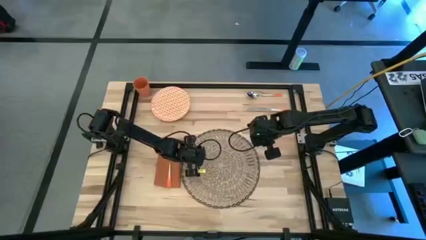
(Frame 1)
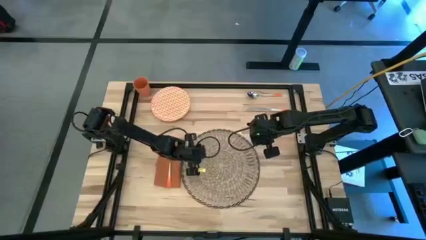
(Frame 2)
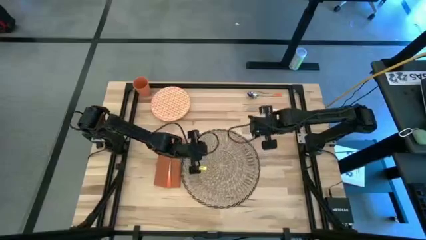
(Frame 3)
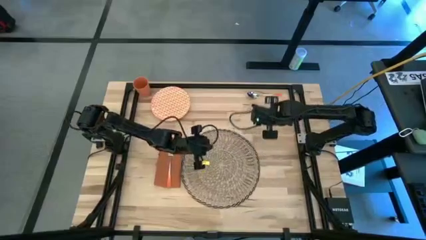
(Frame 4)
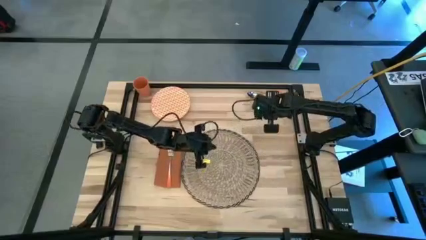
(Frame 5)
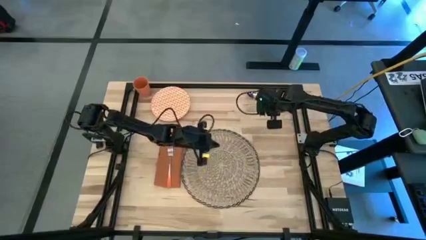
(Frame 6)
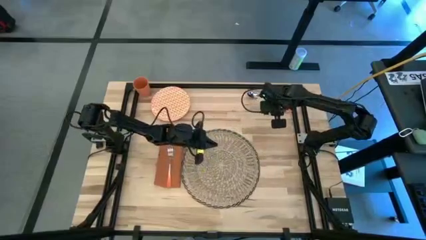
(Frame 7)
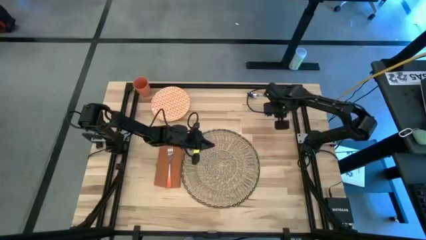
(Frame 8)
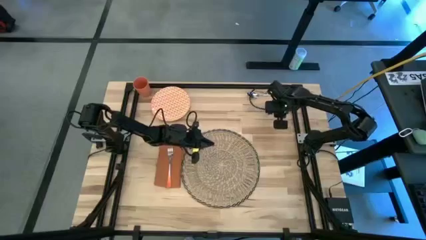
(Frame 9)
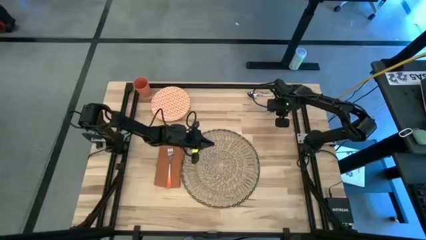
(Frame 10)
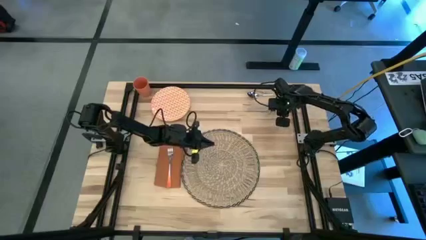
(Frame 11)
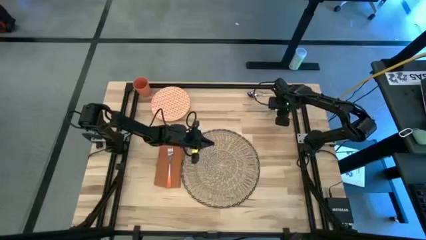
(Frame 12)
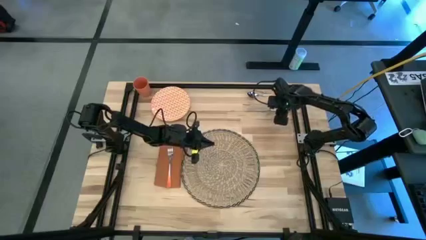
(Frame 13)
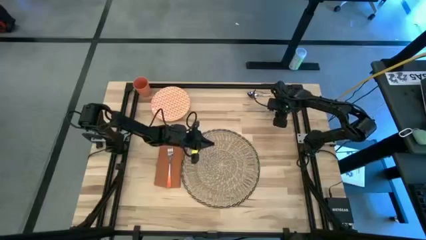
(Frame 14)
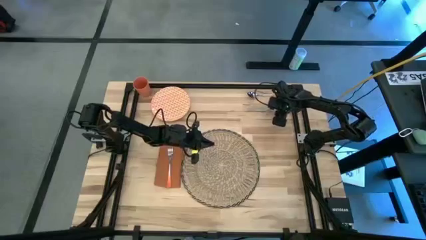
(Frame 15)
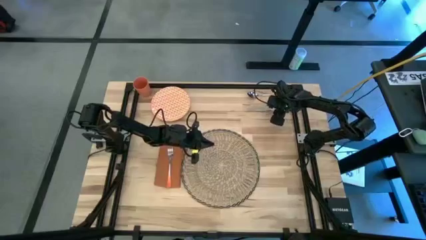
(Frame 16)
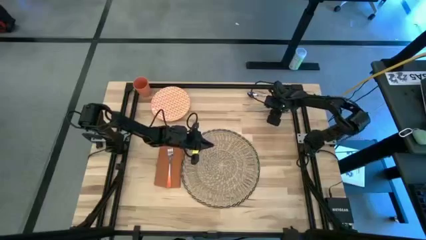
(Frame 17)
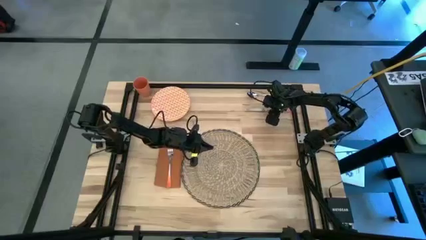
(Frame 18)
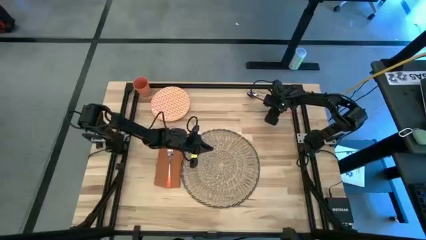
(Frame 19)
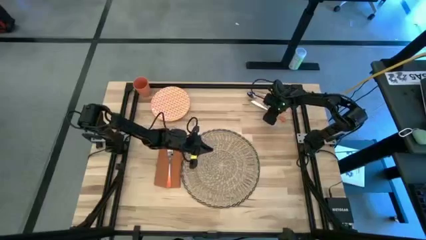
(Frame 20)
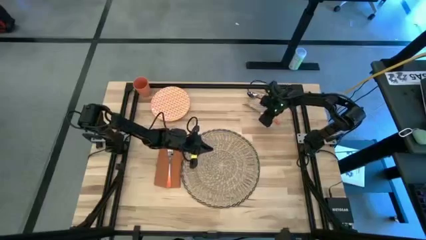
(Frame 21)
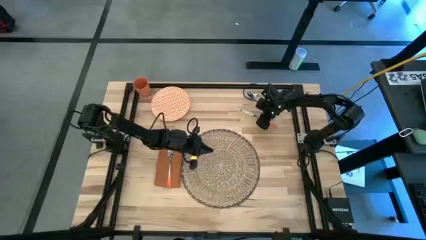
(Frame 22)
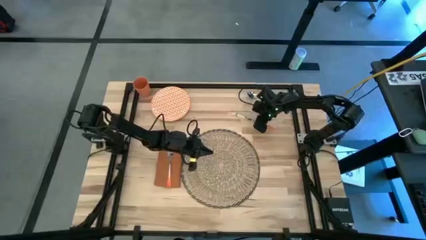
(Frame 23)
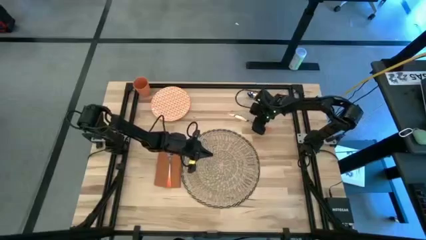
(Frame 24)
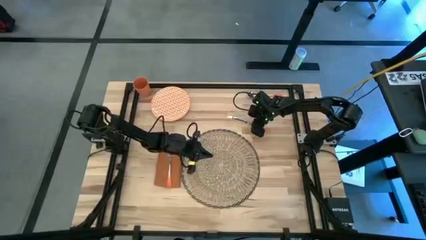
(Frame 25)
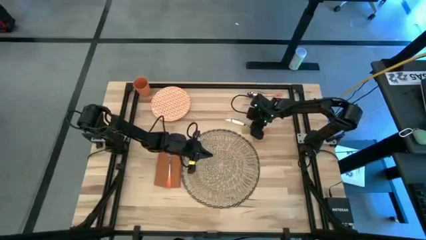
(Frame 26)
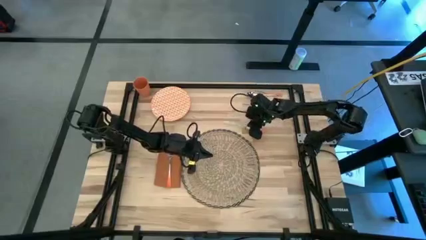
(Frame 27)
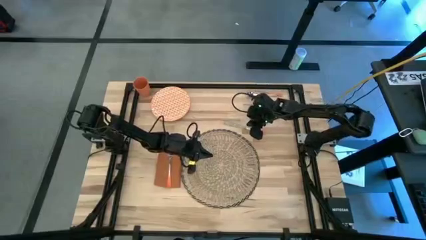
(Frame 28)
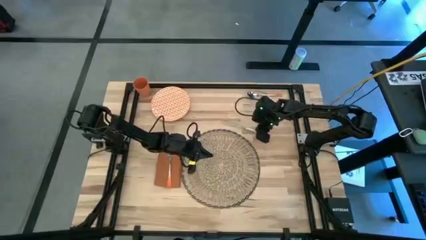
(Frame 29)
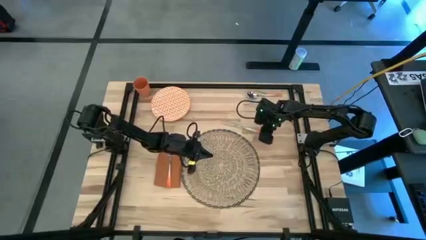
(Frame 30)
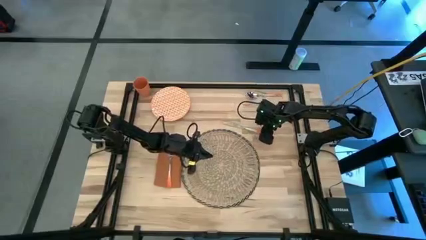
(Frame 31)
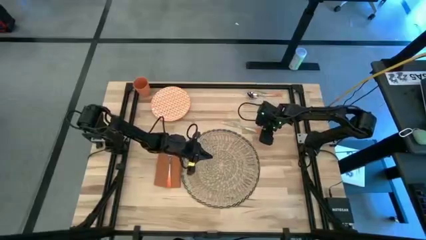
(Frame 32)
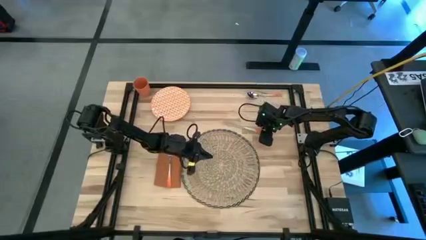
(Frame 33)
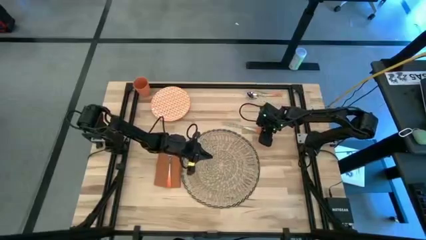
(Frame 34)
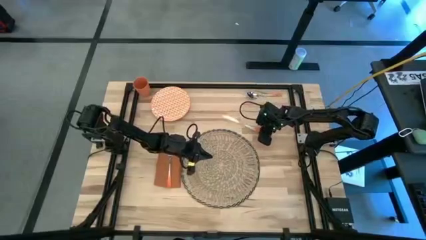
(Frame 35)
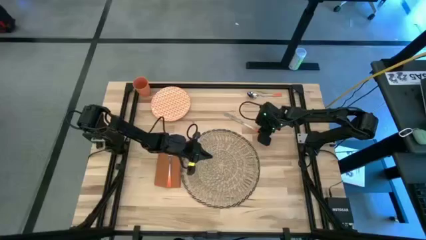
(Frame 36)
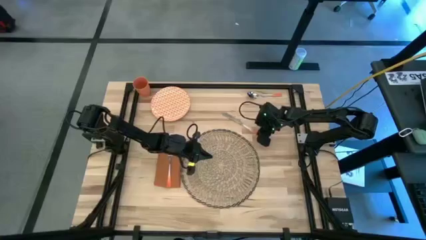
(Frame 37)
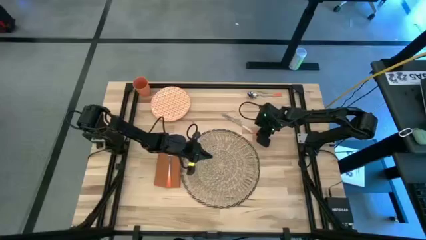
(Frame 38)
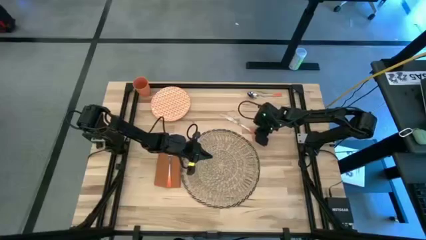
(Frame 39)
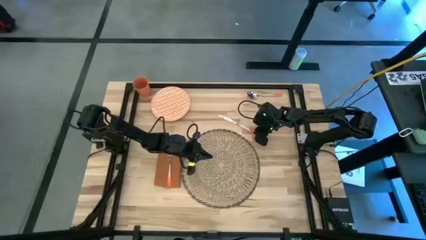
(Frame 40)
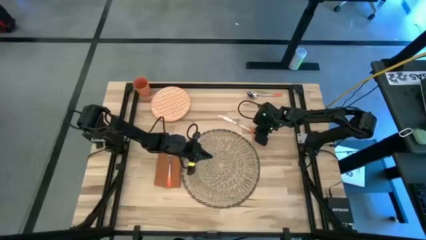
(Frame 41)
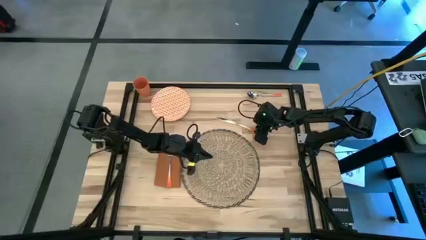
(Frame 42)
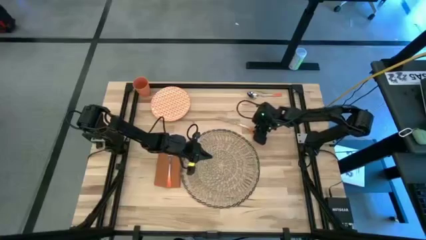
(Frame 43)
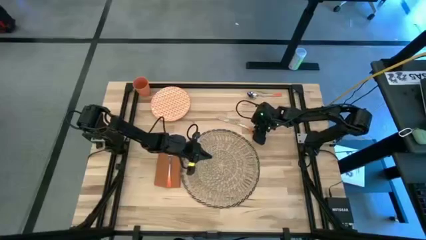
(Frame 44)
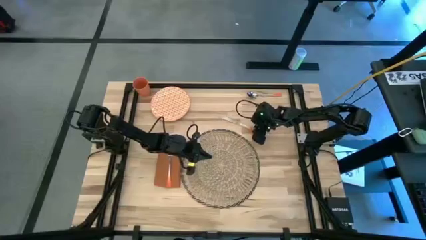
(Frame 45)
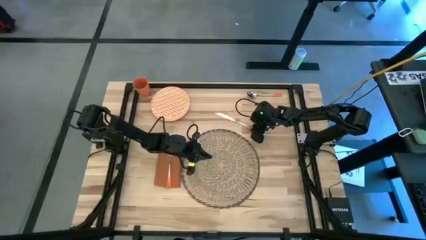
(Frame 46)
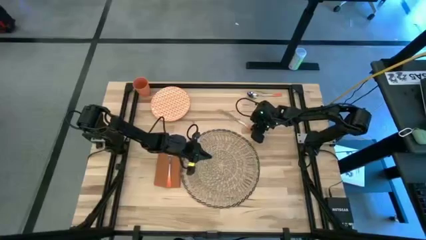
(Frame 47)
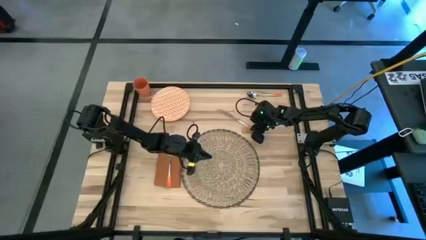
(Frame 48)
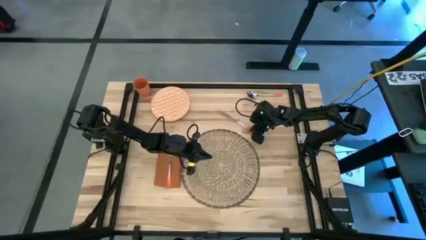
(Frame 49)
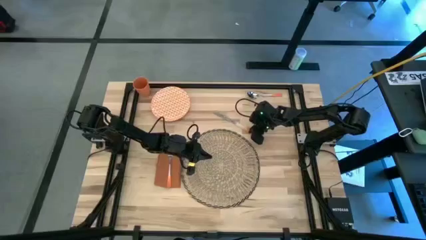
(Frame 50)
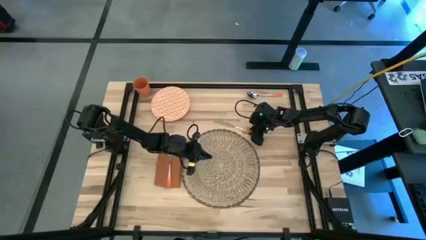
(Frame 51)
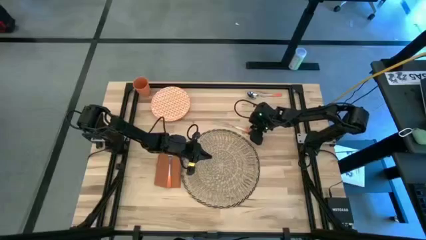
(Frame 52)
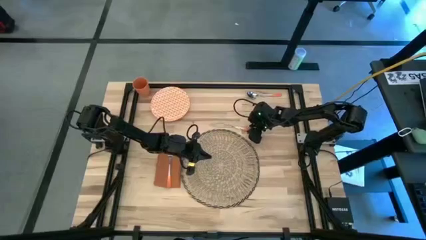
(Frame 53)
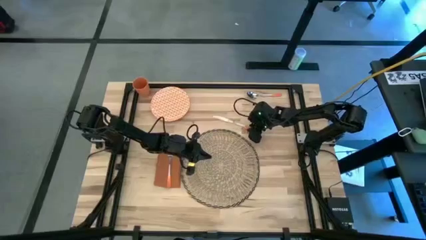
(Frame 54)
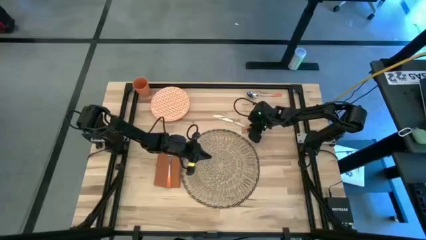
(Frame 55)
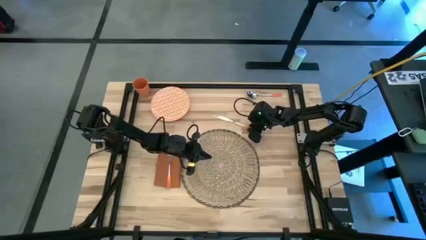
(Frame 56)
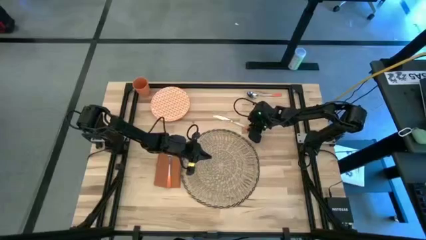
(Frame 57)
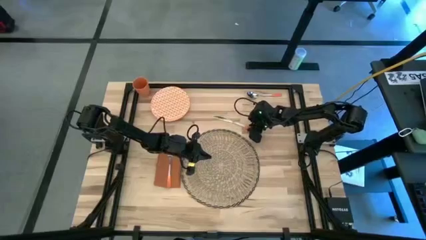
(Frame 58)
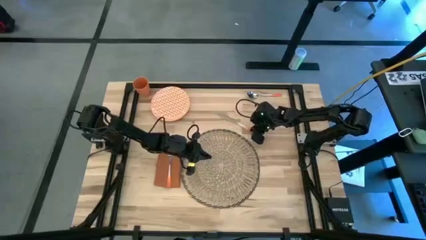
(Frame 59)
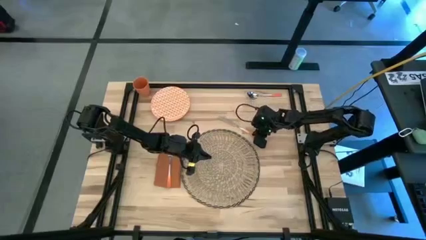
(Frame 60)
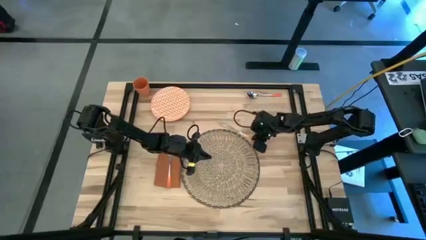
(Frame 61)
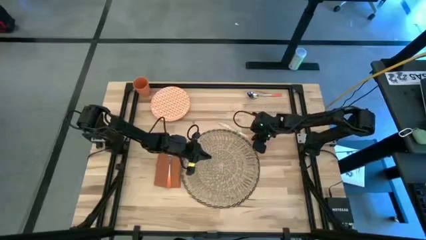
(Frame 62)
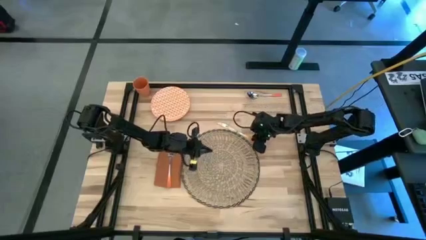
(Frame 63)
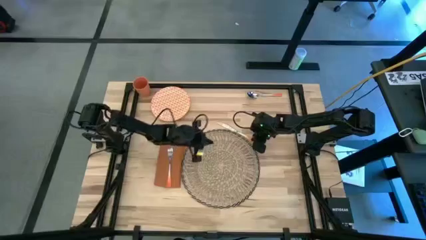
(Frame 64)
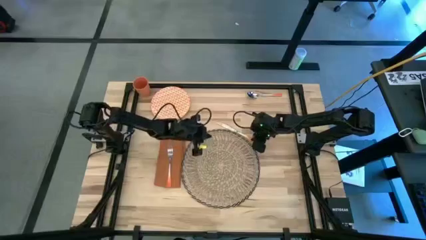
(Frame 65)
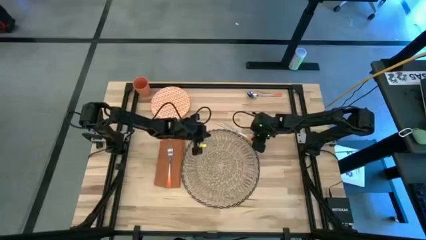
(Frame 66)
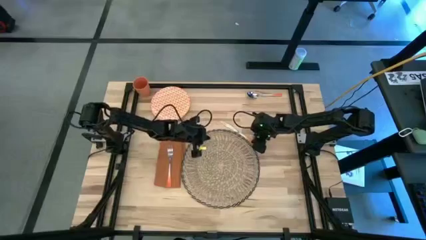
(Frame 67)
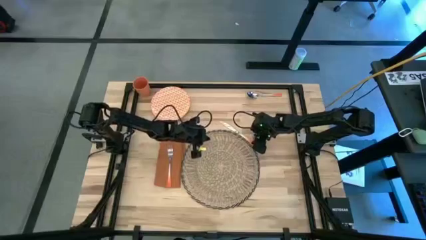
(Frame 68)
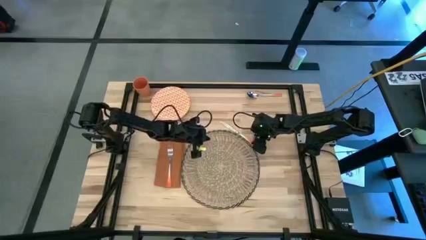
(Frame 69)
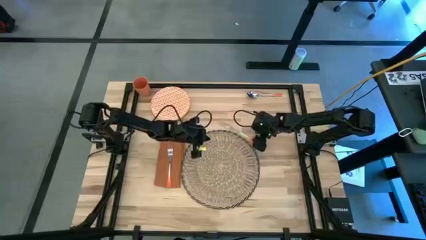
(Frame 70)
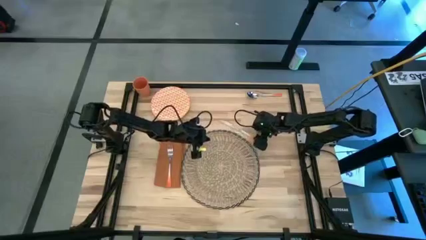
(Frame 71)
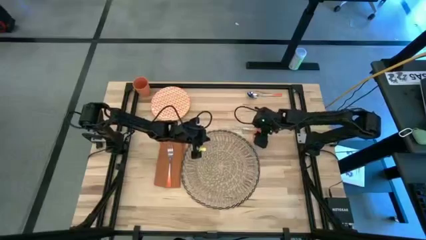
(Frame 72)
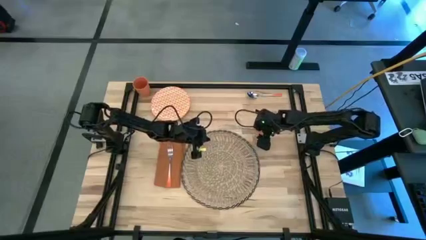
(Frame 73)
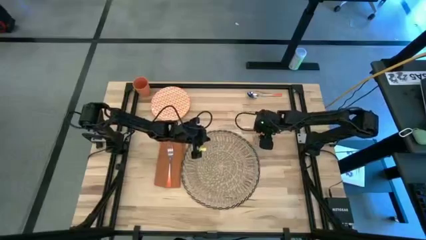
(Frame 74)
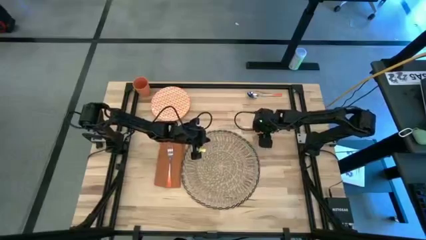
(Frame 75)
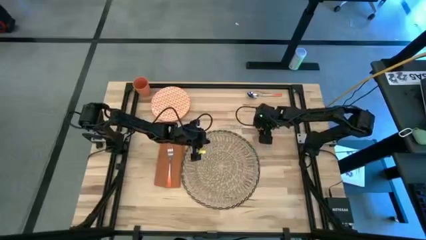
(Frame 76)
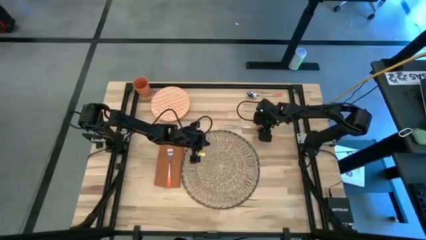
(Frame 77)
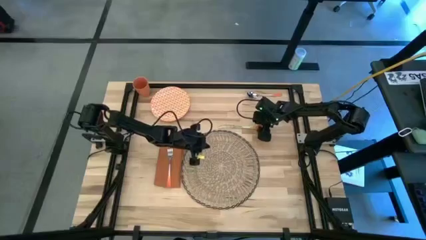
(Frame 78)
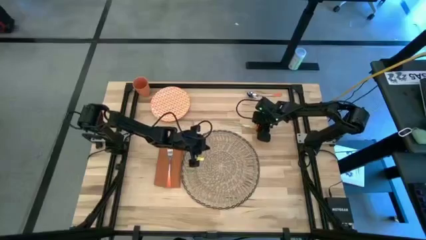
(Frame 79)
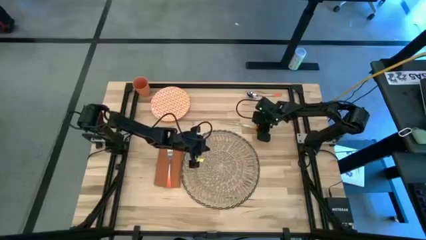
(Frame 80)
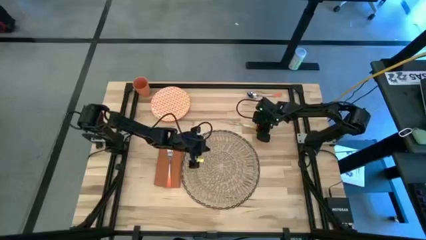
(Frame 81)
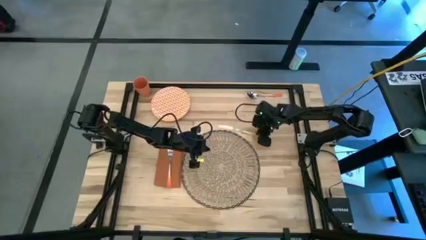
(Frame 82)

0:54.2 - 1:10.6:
Task: Set table place
Put the orange table knife to the right of the brown table mat

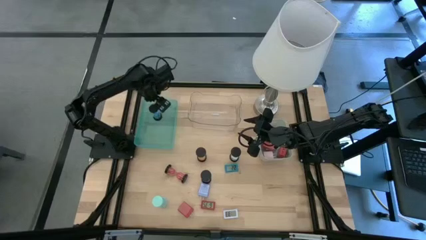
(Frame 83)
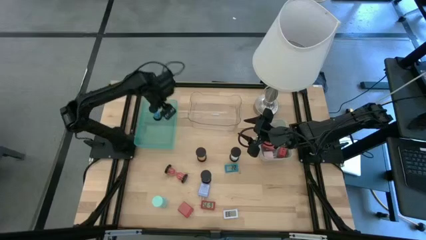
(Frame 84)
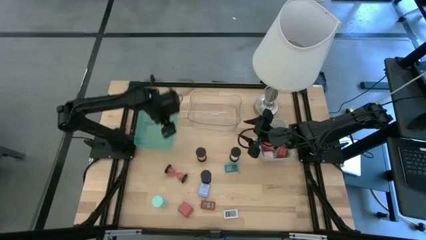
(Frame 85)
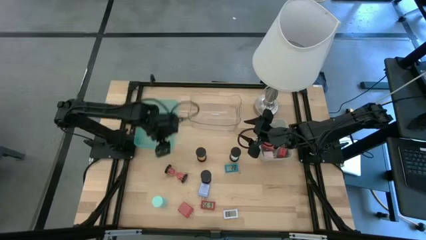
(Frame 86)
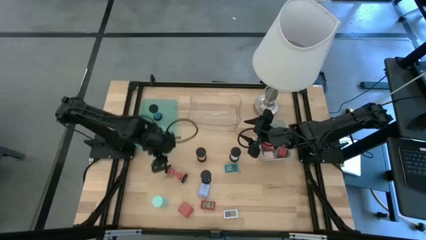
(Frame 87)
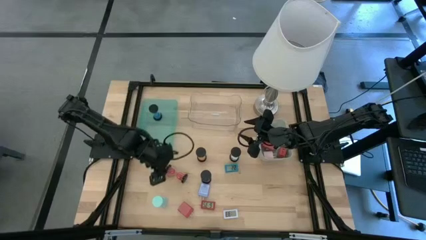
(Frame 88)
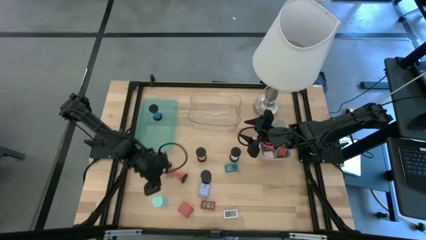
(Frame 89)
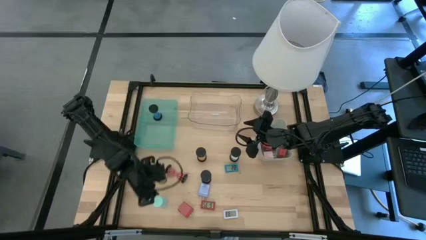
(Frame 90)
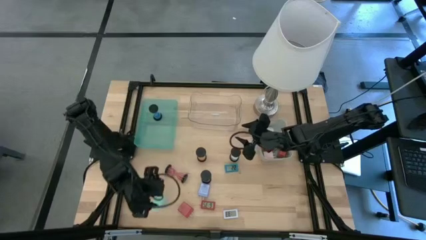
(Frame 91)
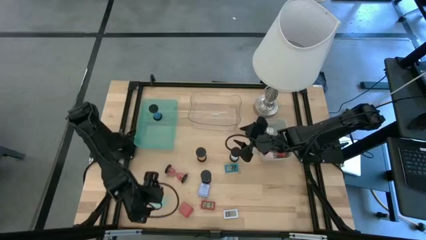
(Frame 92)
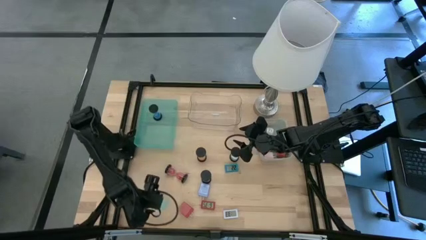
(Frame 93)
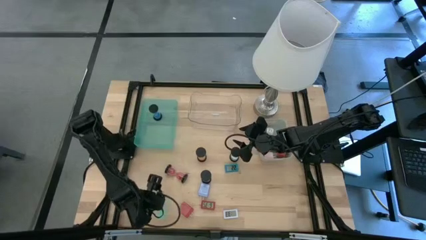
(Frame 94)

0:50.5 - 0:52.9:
Task: Pick & Place Office items
Put the light blue hourglass into the green bin
